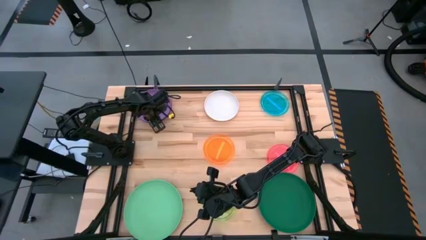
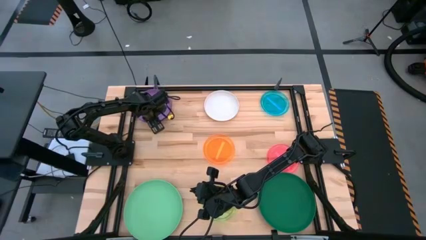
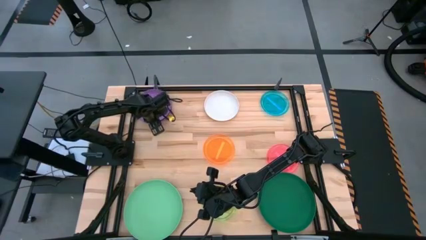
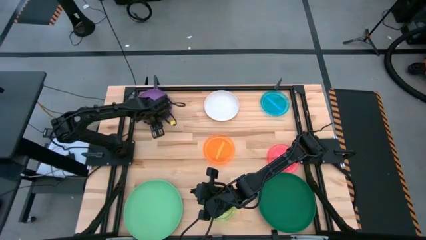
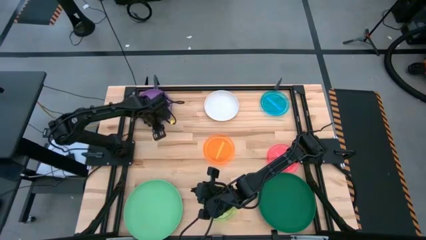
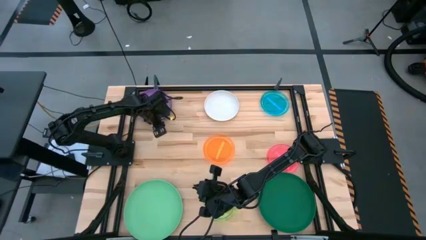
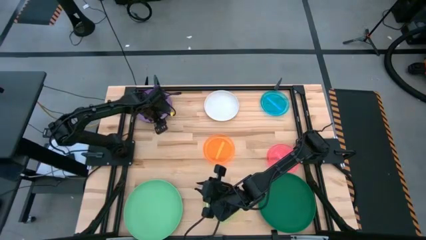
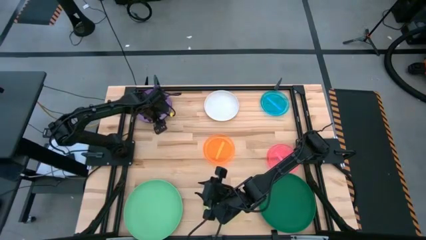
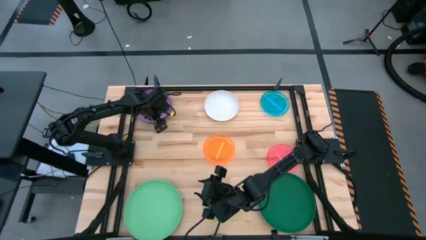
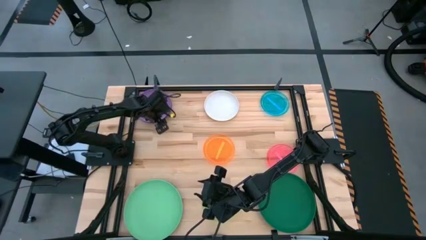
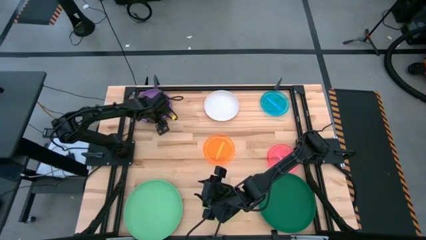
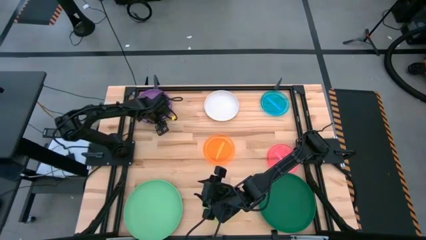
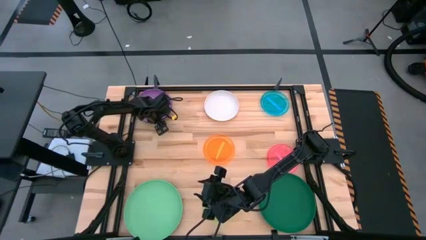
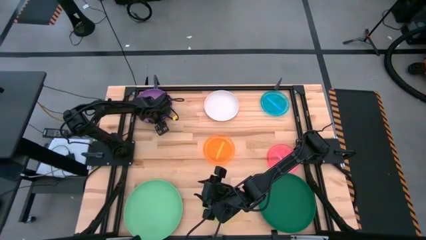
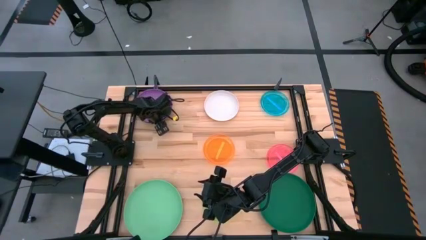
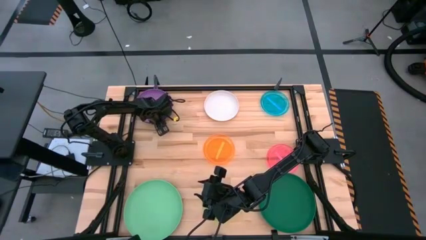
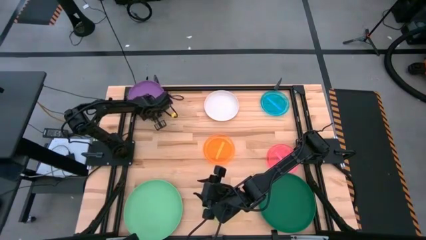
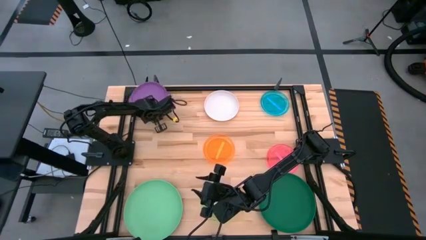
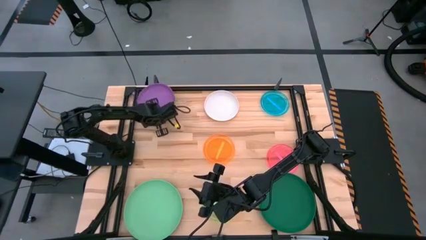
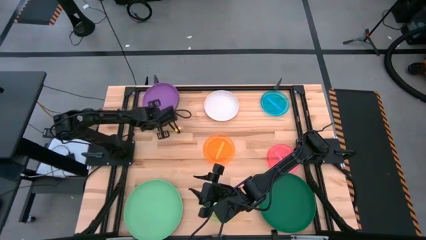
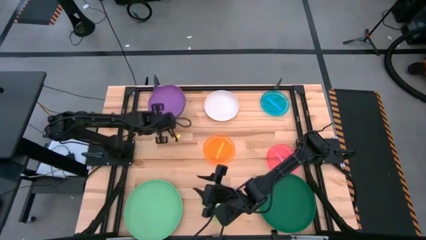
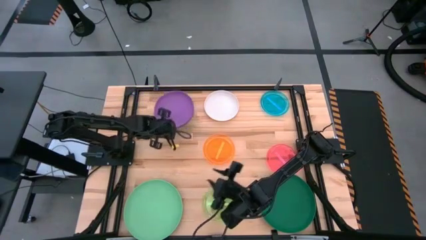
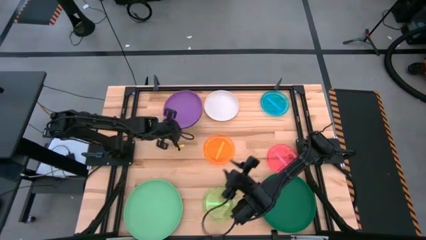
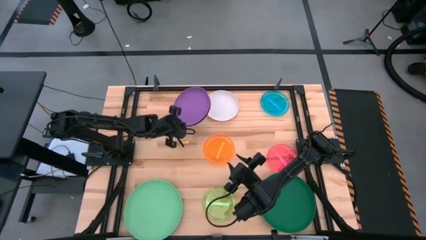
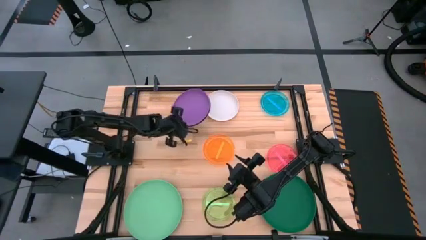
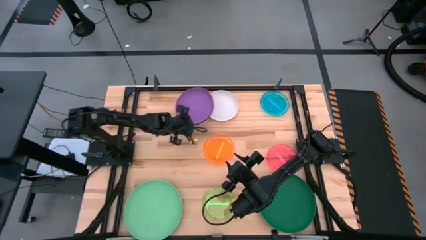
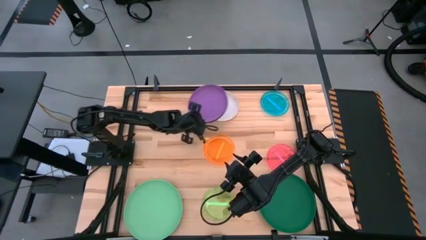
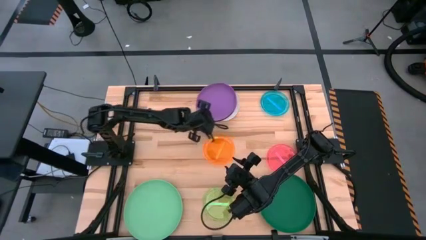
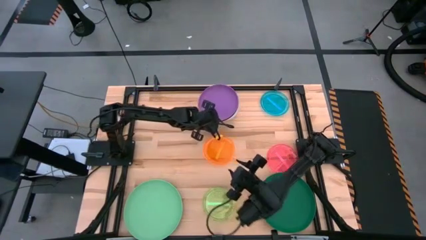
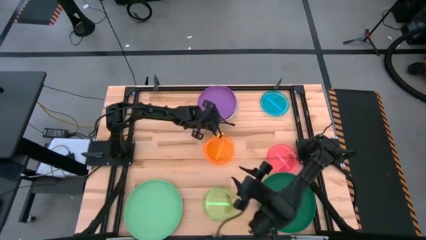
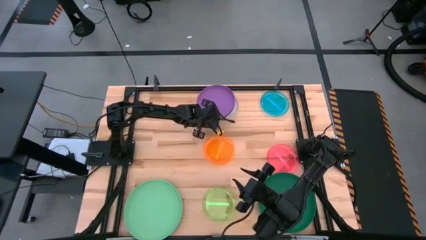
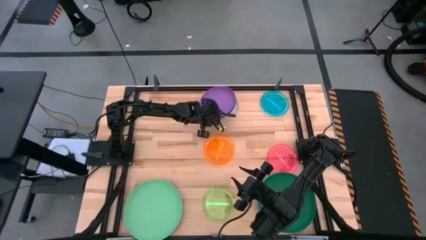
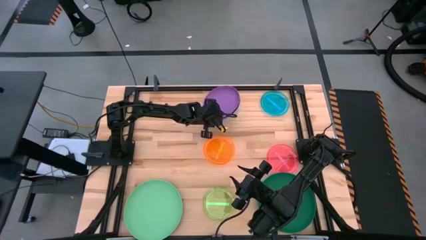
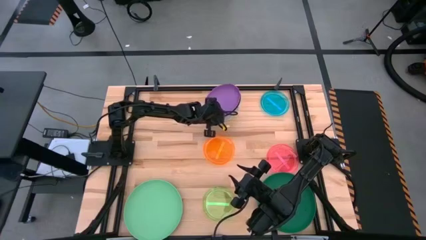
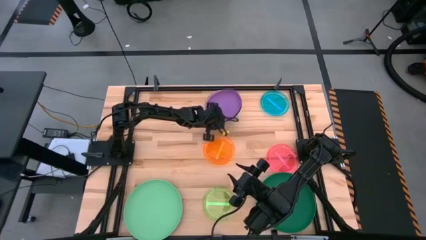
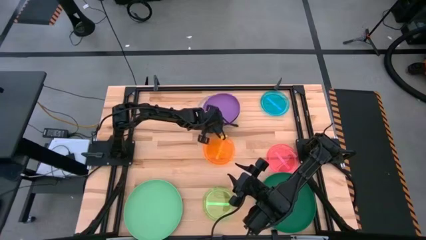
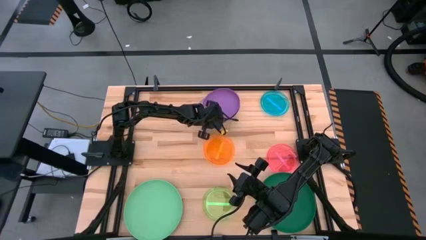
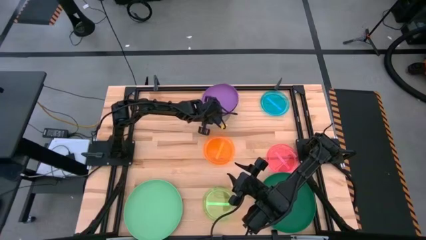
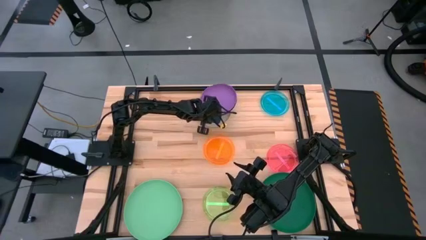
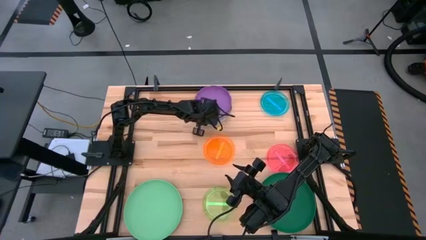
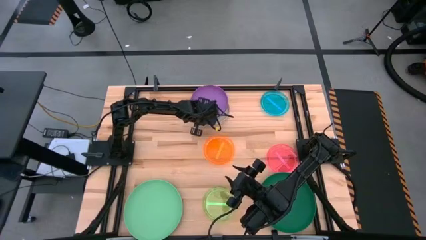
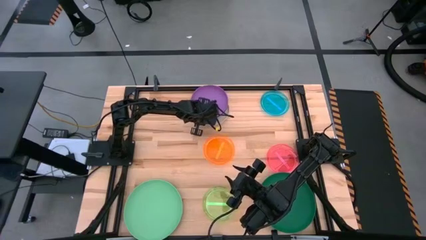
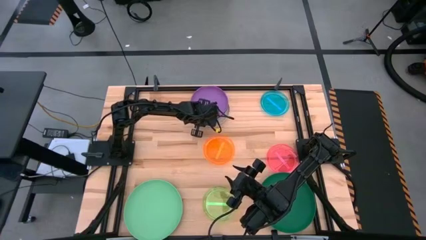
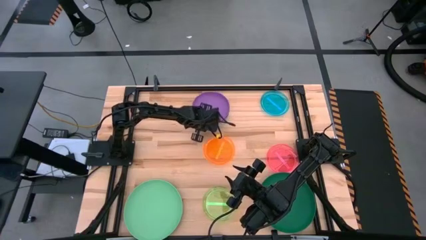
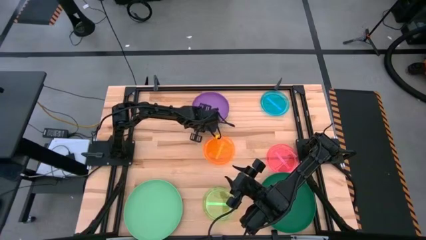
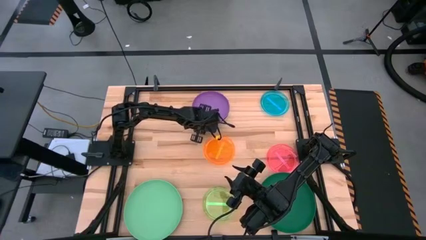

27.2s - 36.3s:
Task: Stack plastic plates
Stack the stacked plates on top of the white plate

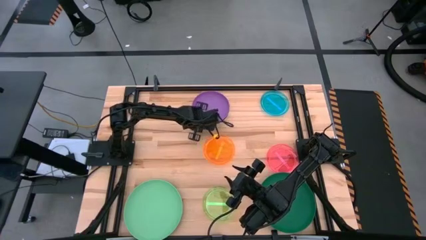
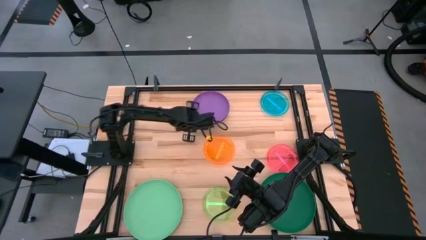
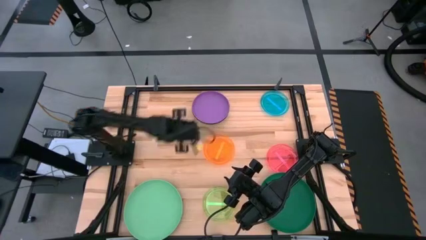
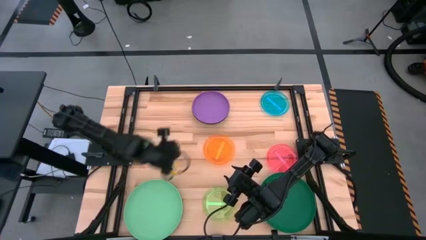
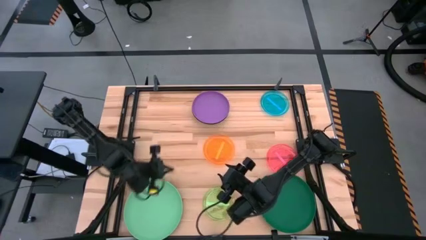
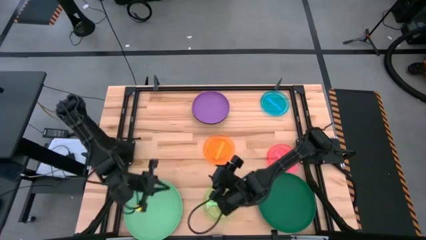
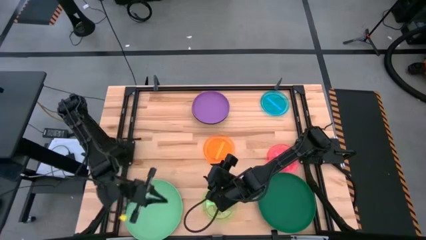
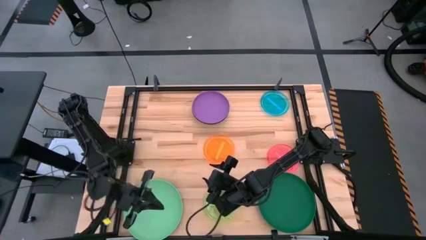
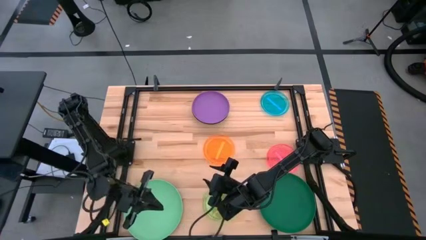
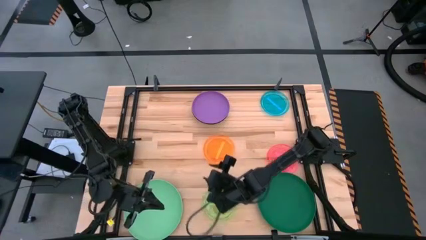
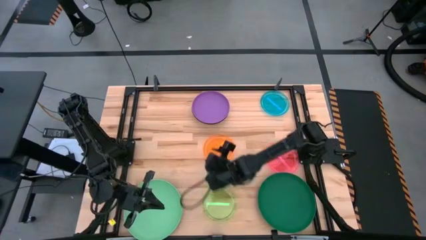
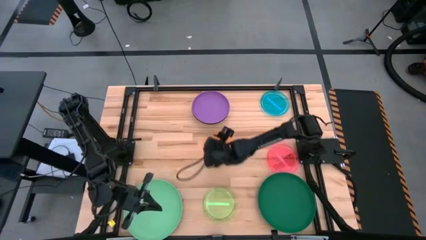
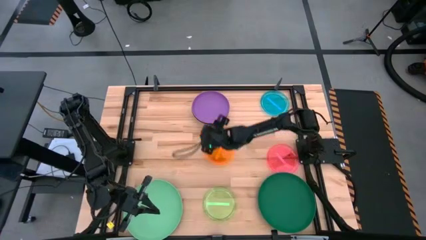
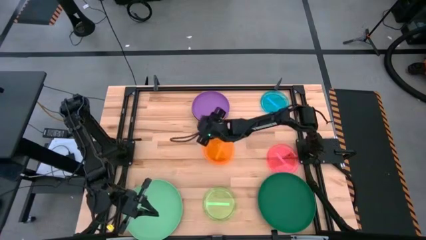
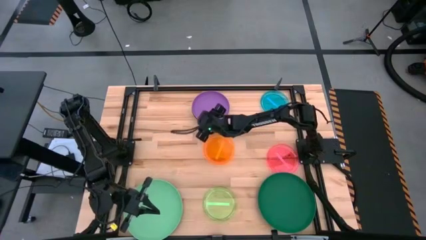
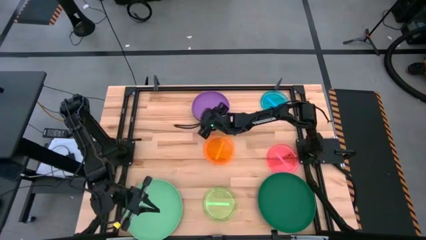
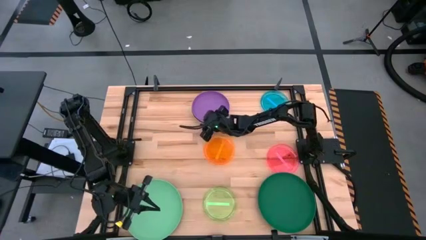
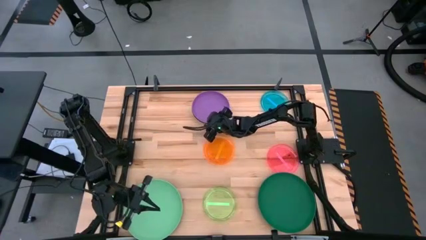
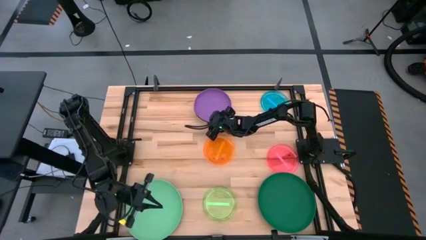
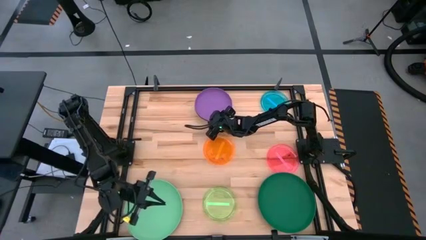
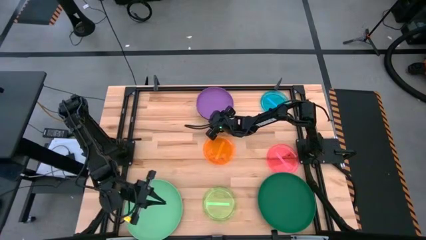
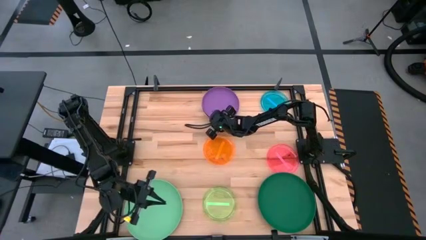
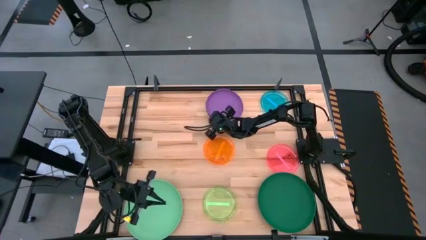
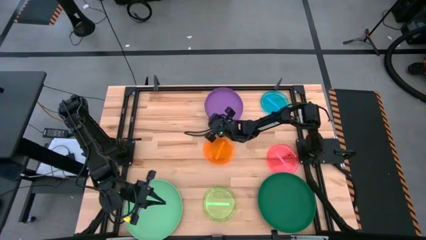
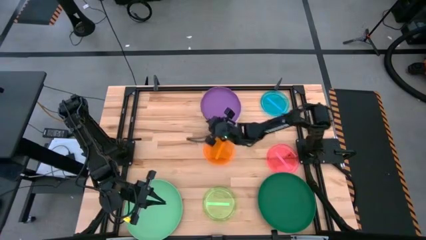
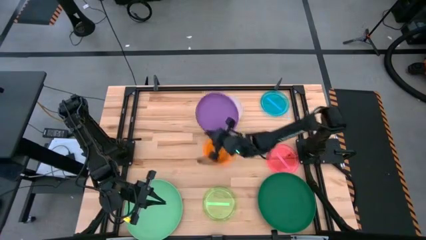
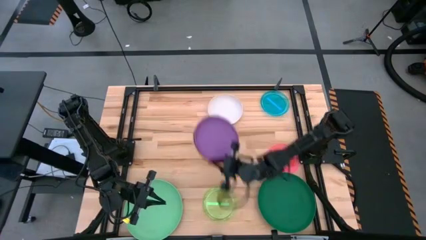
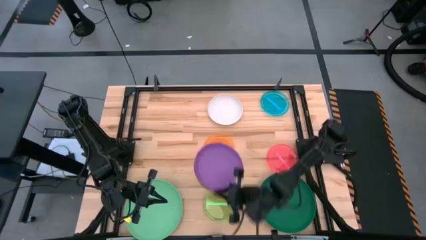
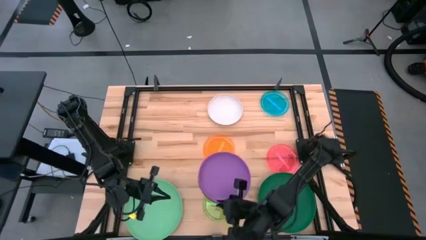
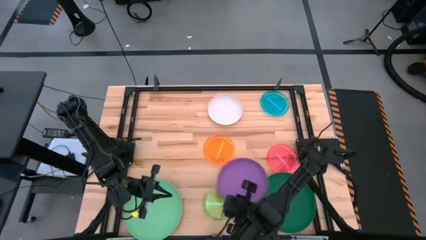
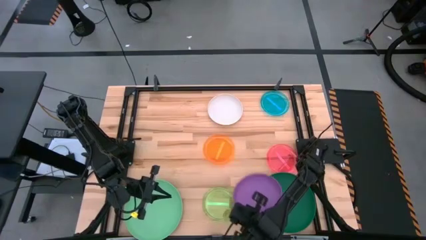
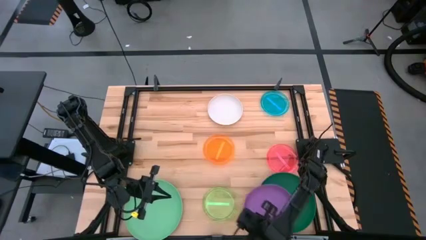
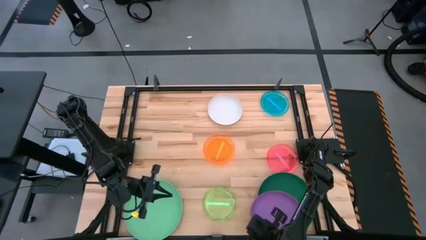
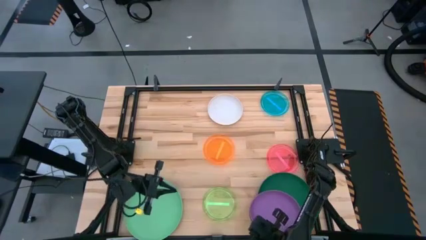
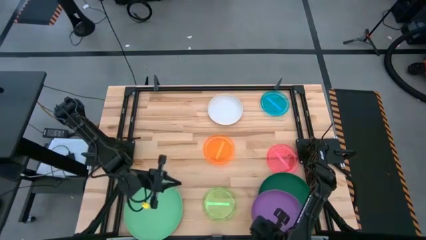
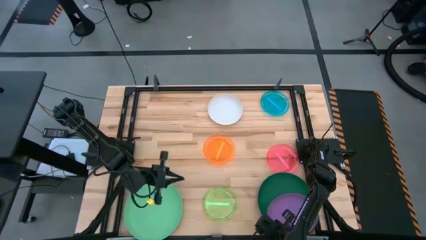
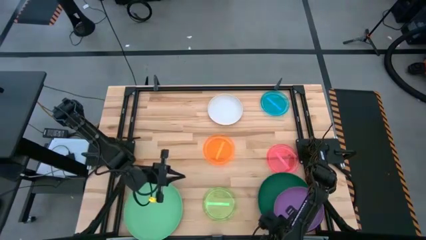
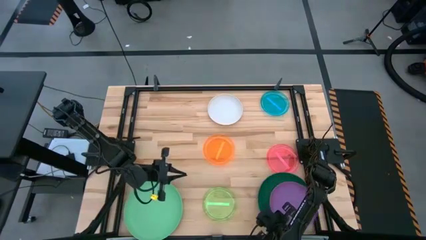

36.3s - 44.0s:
Stack the stacked plates on top of the dark green plate
